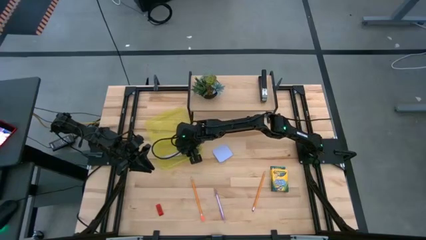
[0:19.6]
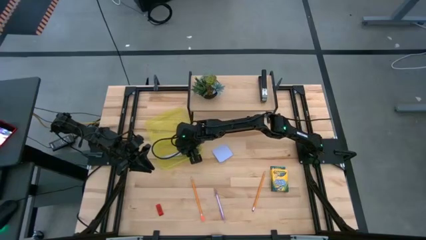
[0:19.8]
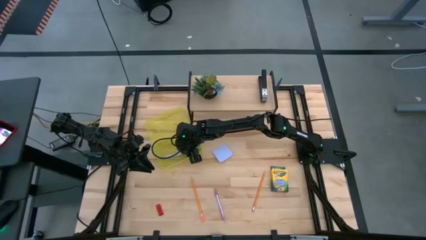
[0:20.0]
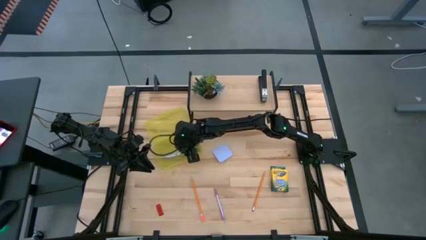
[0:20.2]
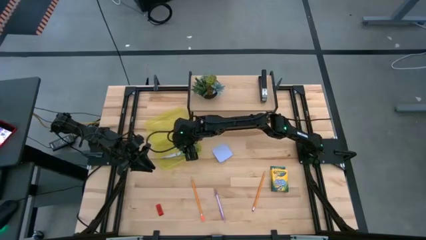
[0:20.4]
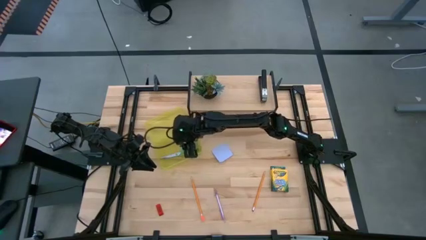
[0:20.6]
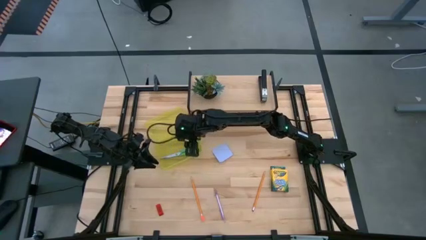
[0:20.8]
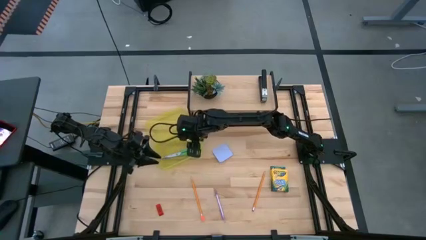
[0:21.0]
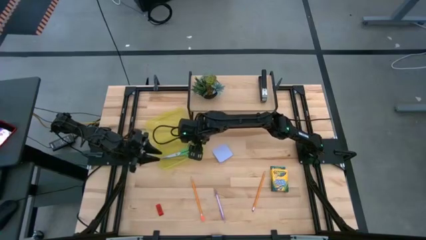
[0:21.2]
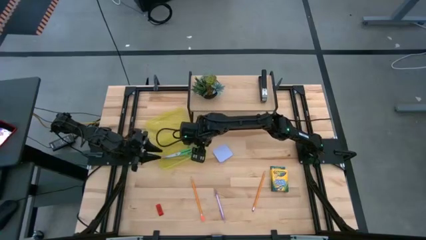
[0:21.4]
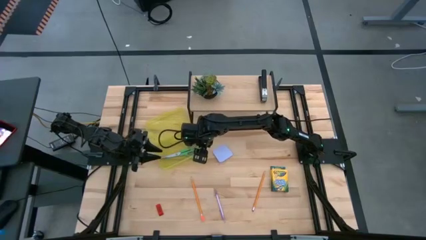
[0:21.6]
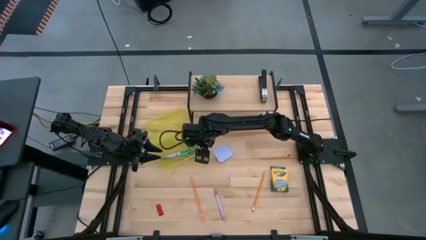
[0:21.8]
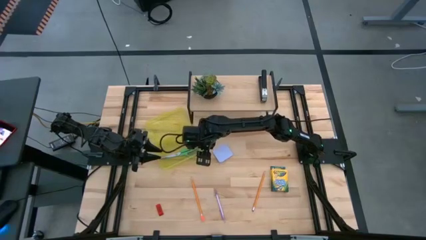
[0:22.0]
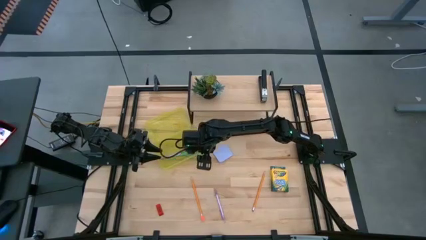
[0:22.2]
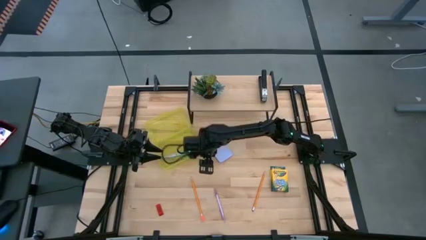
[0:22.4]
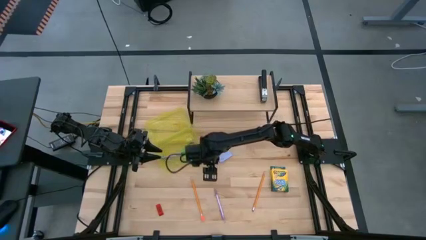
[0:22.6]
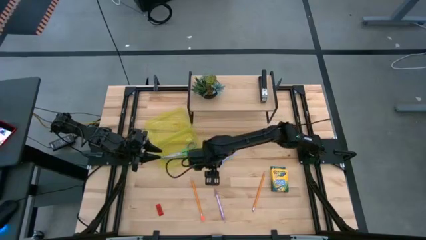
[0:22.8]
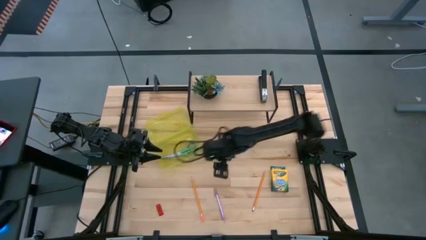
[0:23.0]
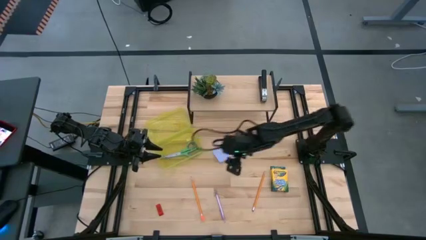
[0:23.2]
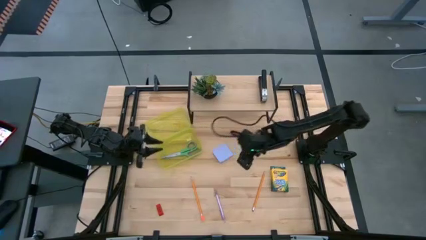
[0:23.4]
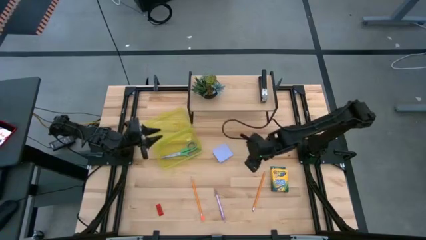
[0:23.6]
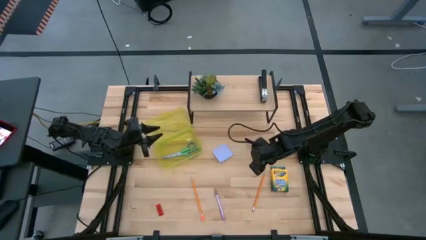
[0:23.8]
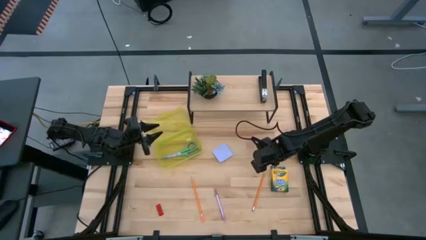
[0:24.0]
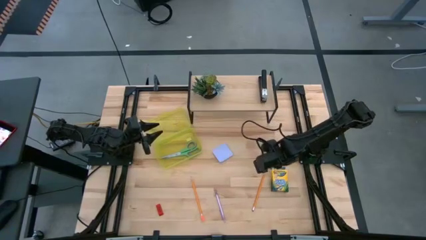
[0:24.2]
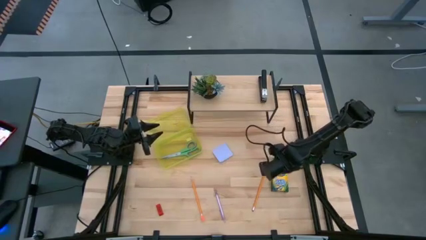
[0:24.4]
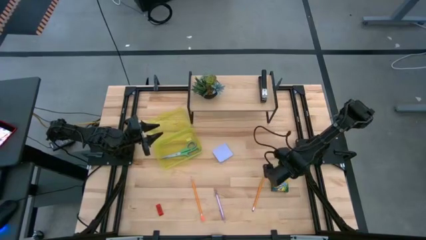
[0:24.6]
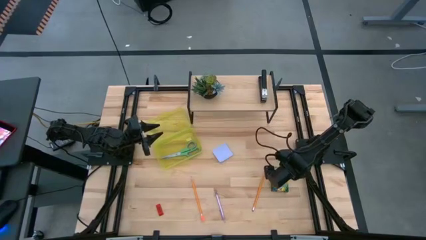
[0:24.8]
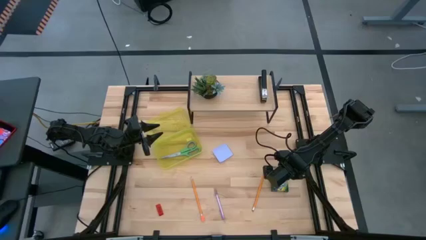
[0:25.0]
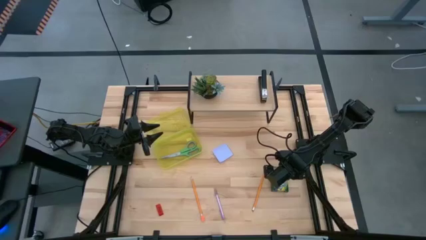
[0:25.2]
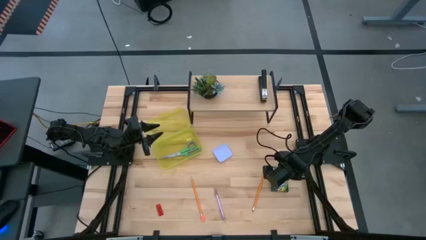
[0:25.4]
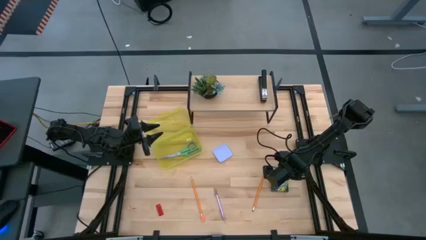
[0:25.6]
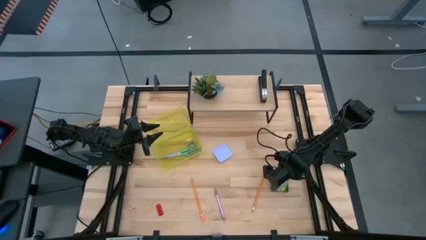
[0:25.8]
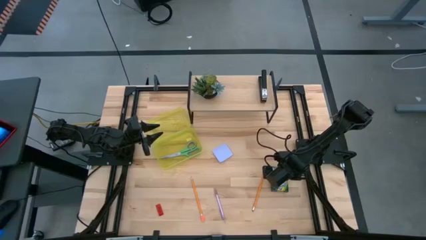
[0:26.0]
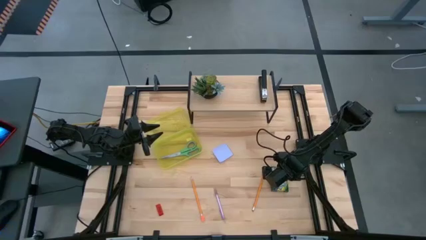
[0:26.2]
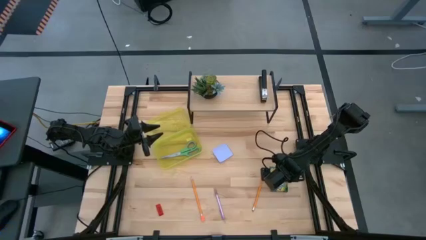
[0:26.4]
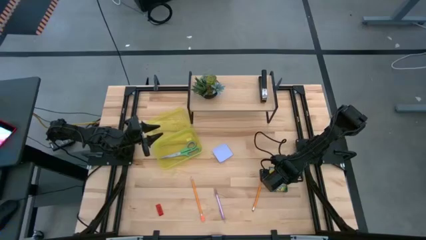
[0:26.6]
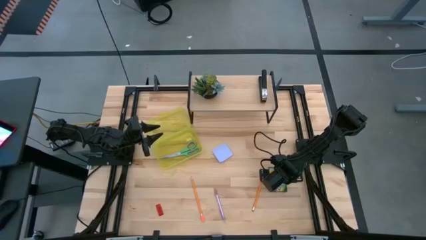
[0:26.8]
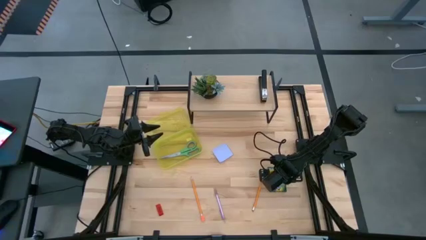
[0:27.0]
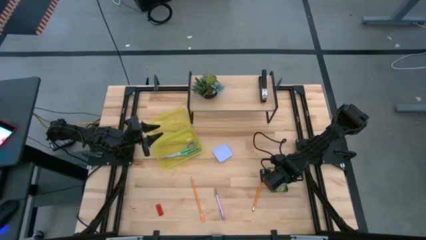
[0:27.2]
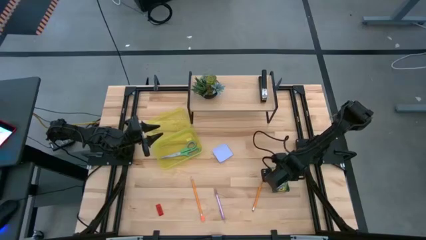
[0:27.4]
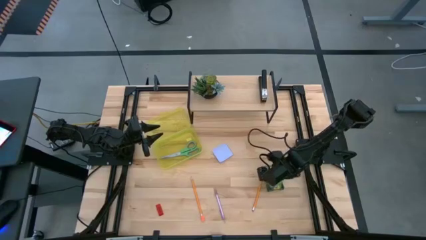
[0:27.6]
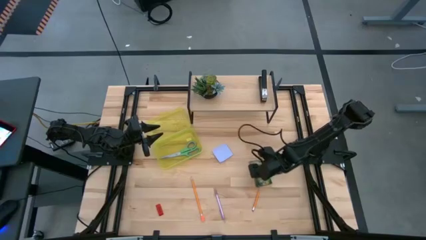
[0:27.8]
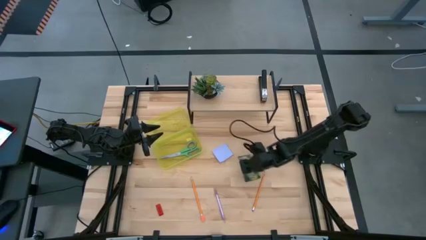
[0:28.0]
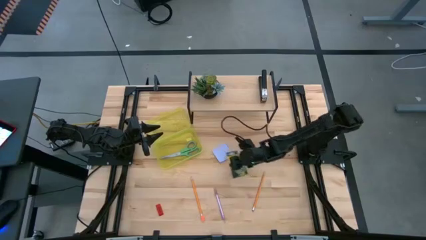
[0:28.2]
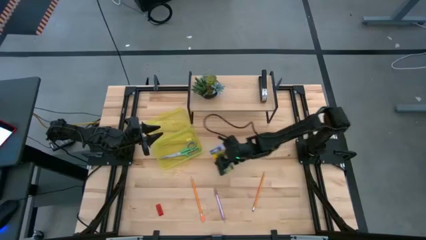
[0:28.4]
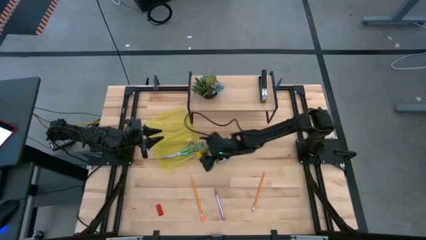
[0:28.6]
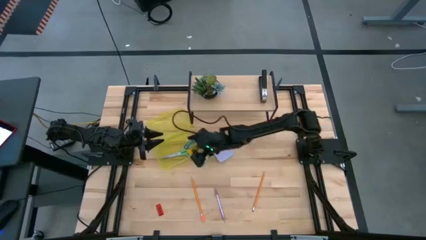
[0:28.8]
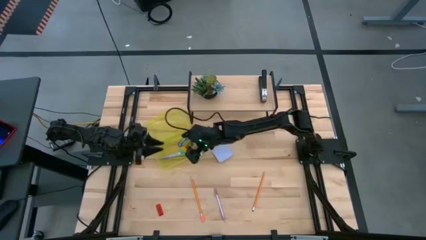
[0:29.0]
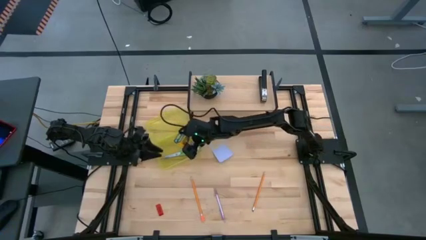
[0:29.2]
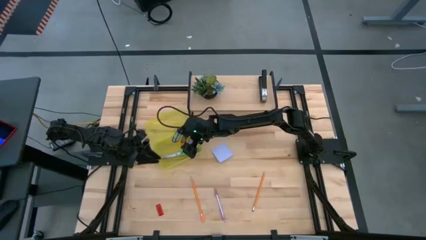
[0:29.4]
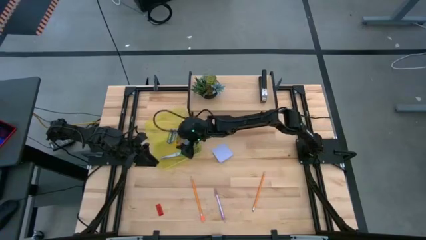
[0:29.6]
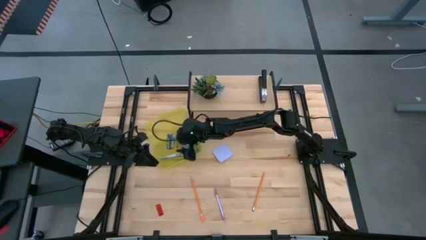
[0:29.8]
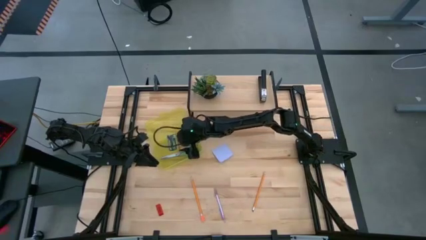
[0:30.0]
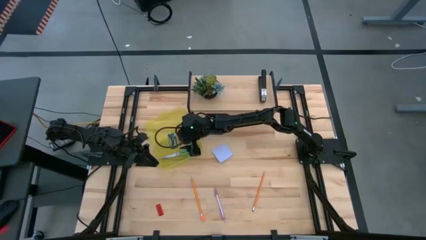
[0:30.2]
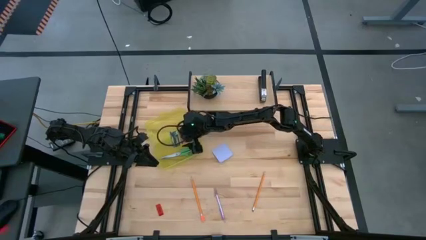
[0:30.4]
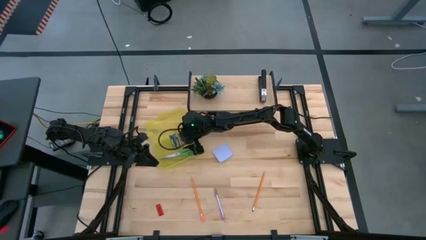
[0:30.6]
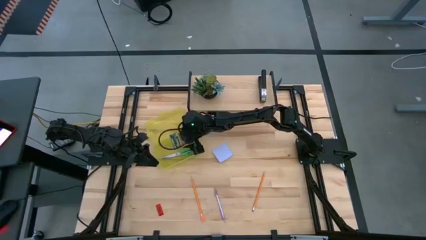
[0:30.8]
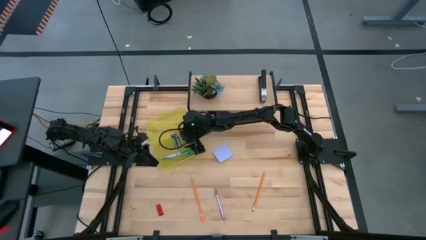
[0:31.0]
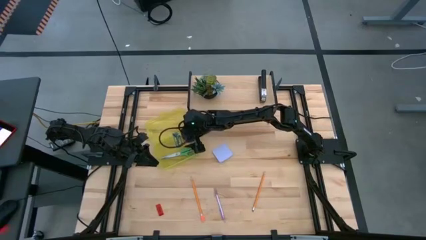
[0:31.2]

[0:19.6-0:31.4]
Task: Pack school essentials
Put the yellow crayon box into the yellow supply box

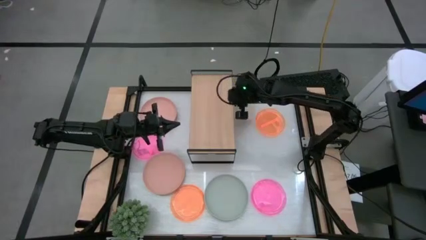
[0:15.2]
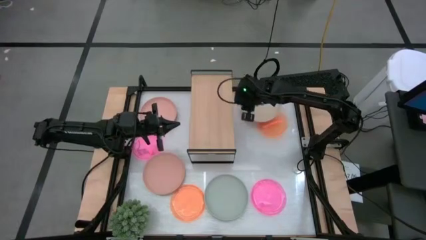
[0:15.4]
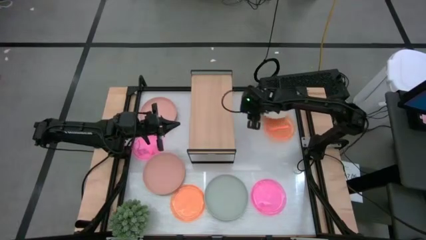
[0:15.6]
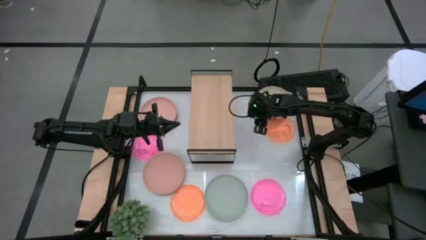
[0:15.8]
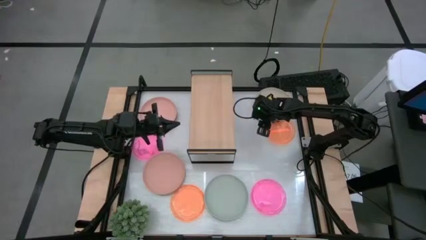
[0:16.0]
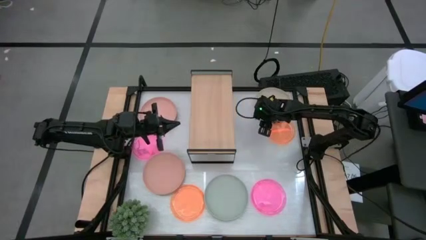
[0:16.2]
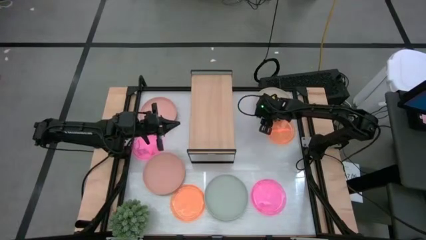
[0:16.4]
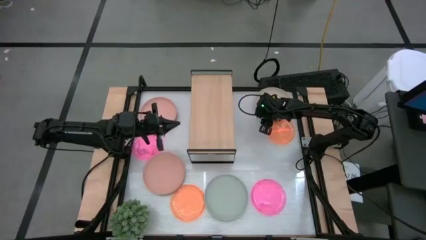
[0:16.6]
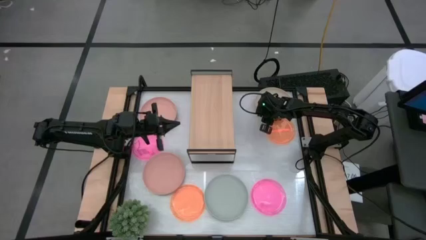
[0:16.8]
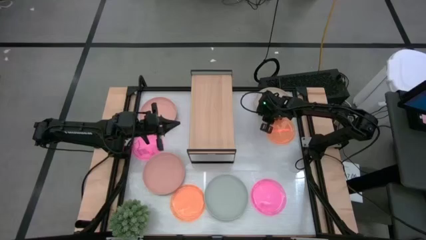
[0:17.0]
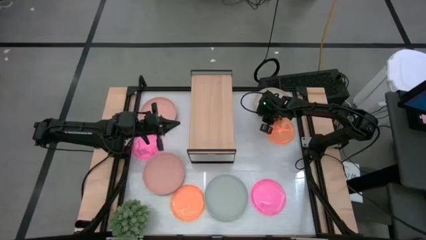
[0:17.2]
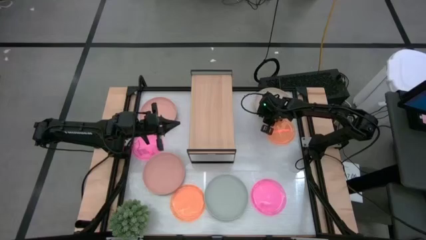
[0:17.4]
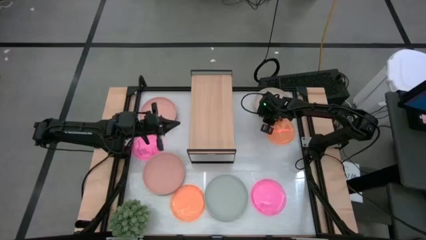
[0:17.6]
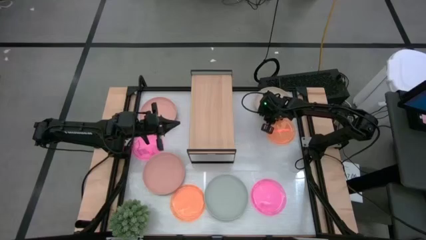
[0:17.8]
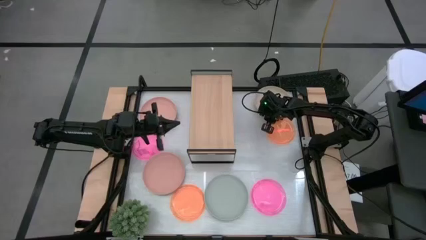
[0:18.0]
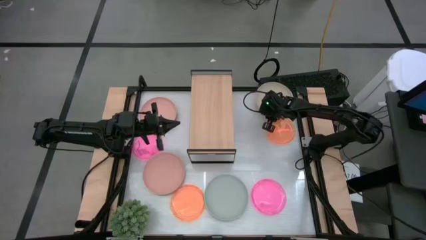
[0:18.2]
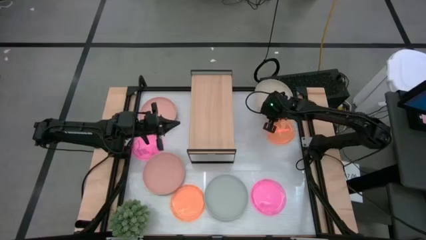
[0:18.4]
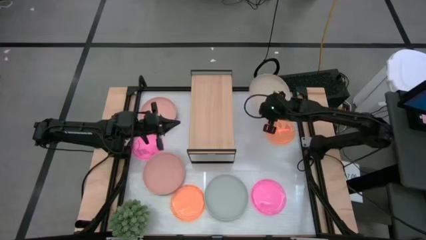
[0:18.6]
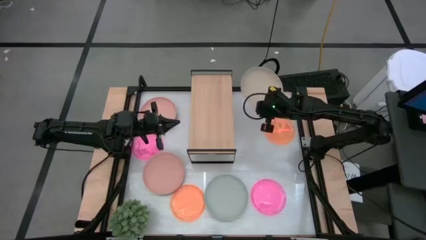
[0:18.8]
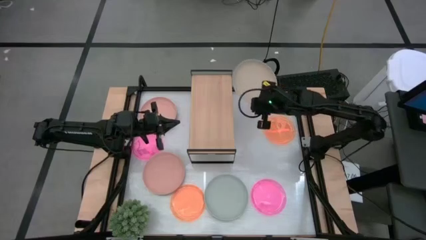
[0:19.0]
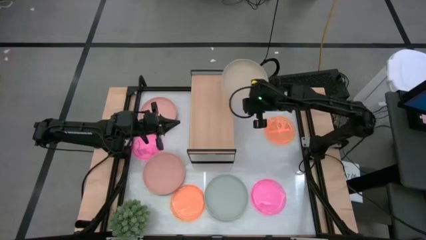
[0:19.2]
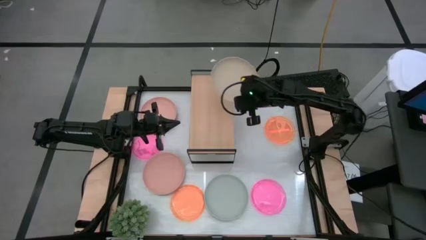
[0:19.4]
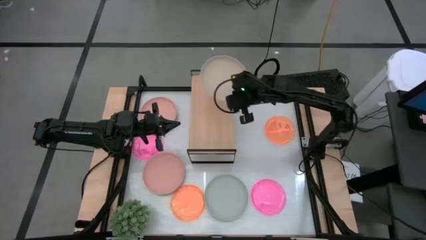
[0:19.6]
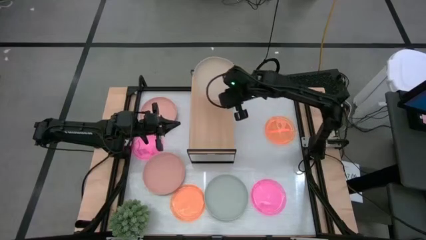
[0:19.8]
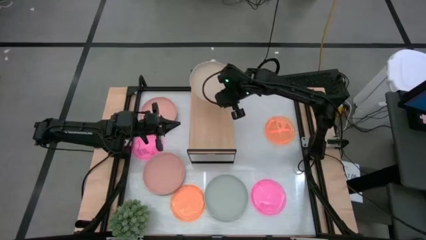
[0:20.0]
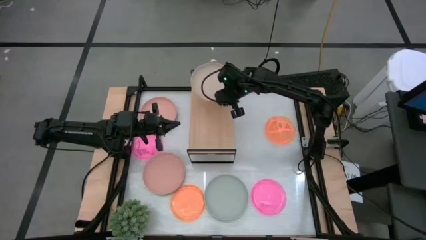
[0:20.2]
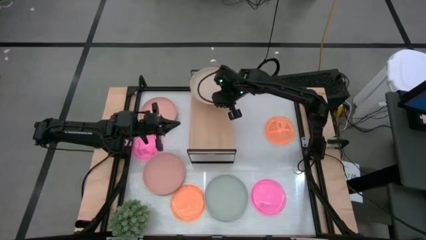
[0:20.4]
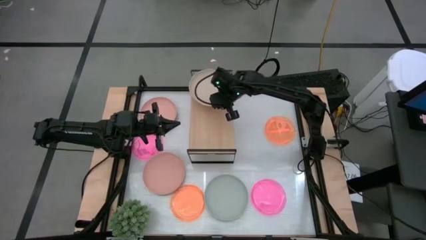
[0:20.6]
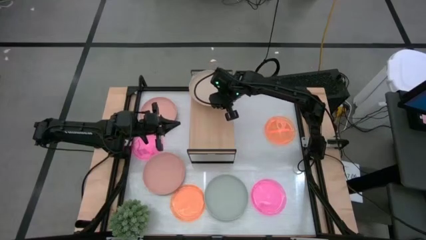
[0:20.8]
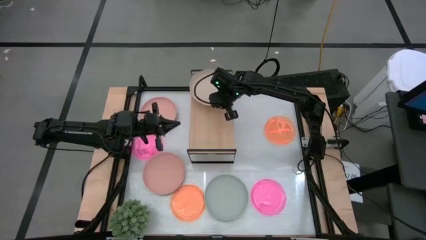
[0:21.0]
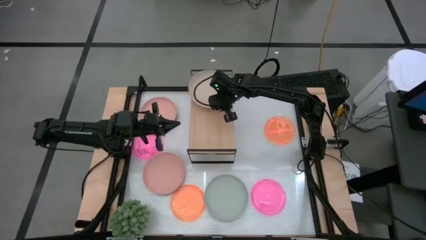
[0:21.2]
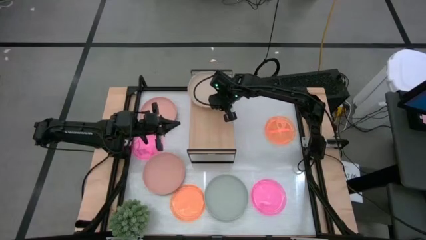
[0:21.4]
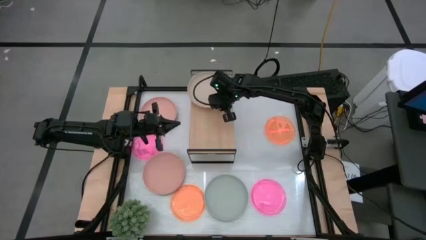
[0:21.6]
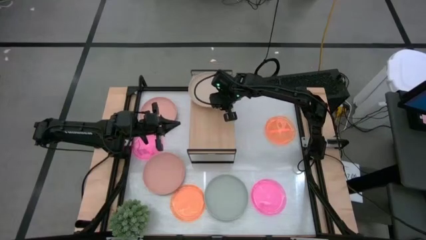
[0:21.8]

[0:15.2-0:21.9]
Task: Place and stack plates onto a shelf
Put the brown plate on the shelf
